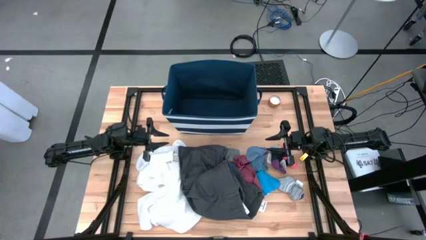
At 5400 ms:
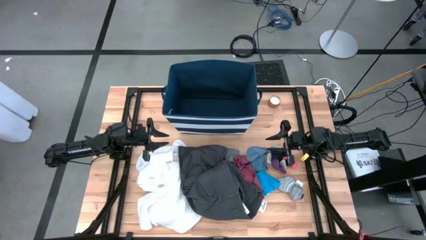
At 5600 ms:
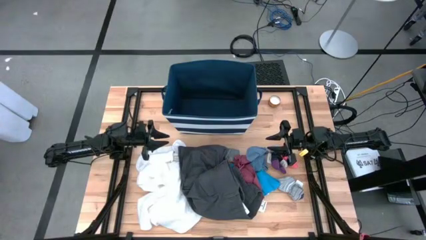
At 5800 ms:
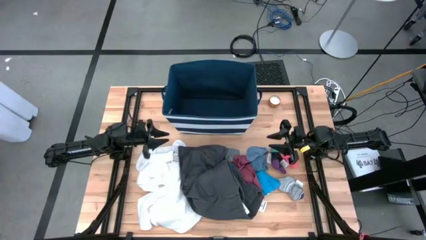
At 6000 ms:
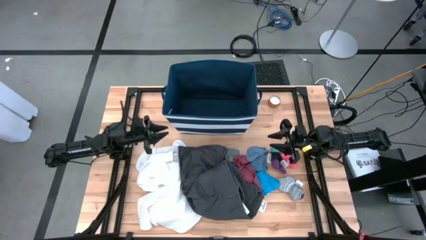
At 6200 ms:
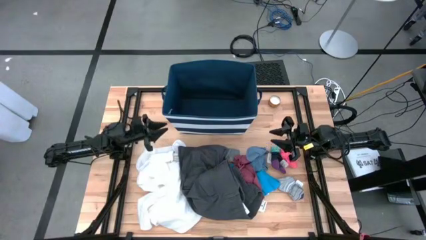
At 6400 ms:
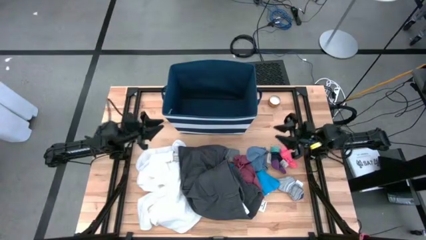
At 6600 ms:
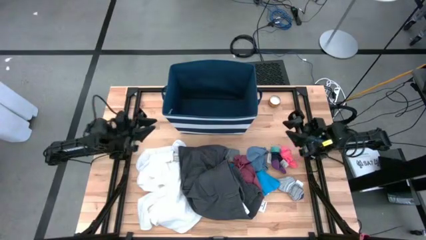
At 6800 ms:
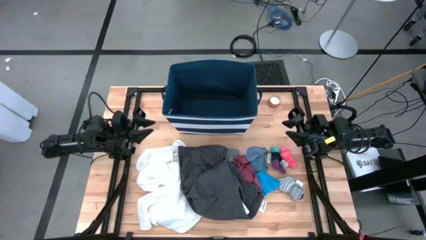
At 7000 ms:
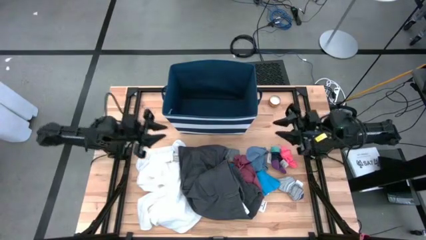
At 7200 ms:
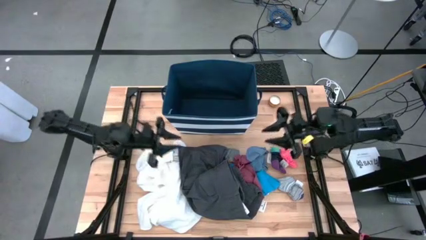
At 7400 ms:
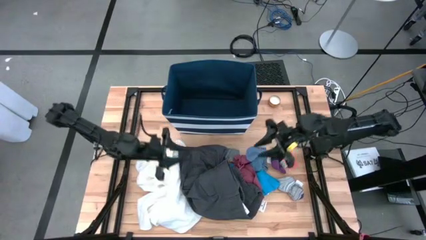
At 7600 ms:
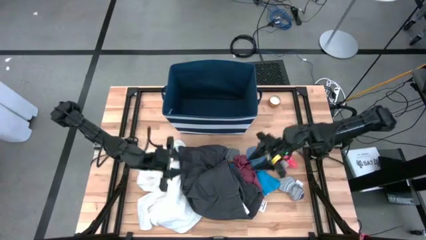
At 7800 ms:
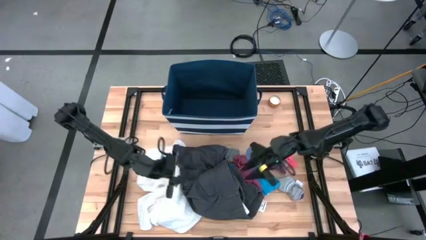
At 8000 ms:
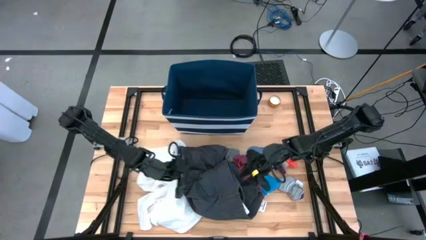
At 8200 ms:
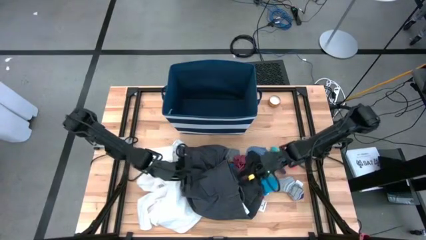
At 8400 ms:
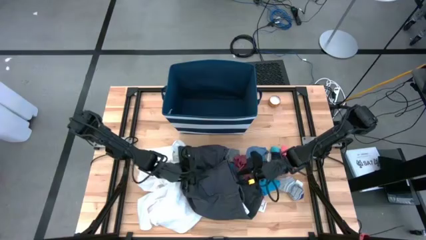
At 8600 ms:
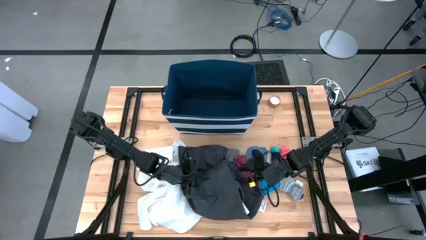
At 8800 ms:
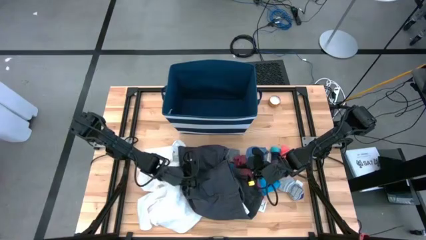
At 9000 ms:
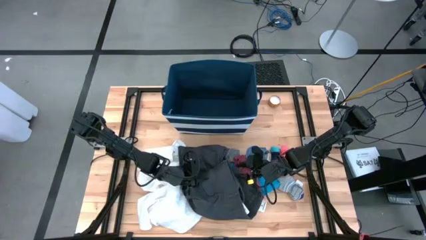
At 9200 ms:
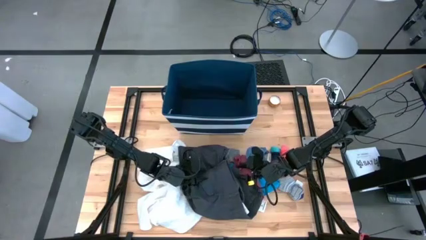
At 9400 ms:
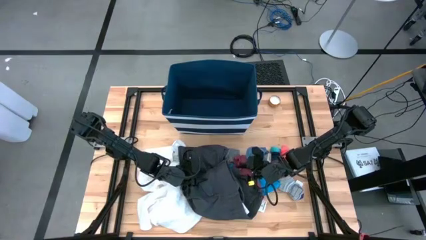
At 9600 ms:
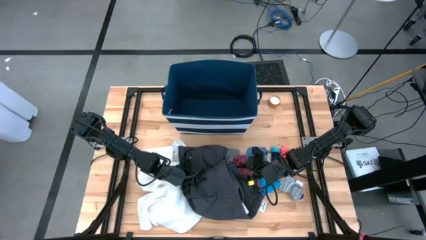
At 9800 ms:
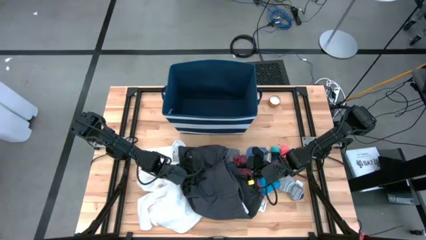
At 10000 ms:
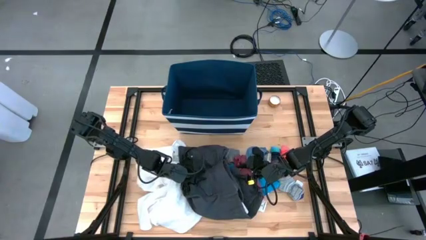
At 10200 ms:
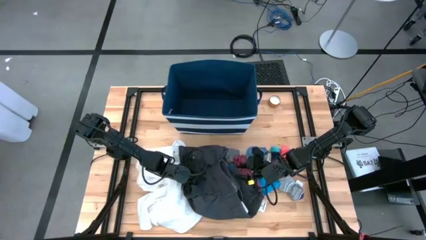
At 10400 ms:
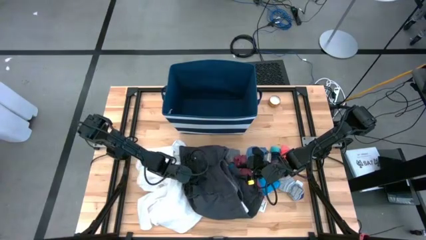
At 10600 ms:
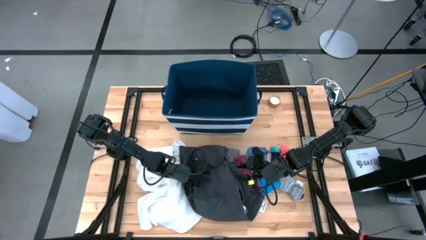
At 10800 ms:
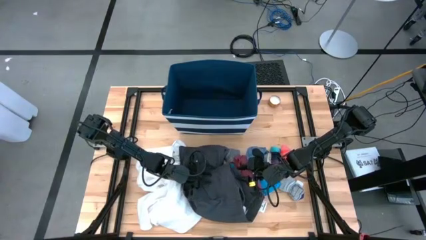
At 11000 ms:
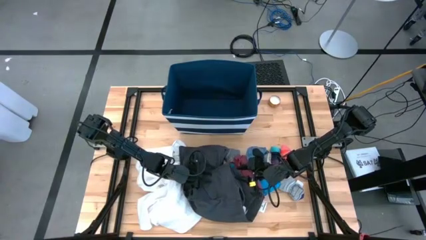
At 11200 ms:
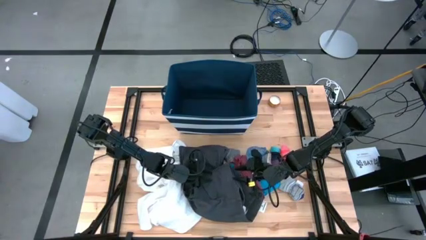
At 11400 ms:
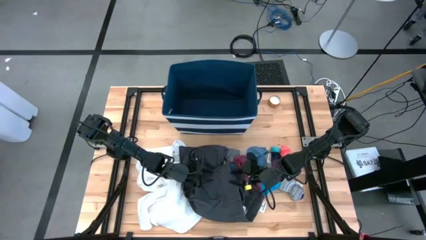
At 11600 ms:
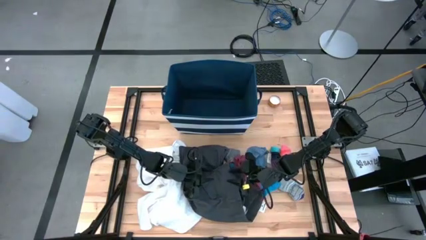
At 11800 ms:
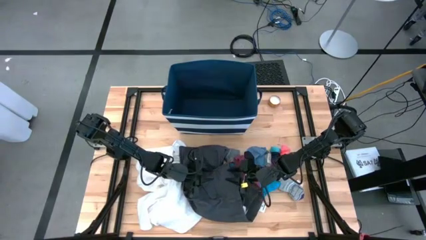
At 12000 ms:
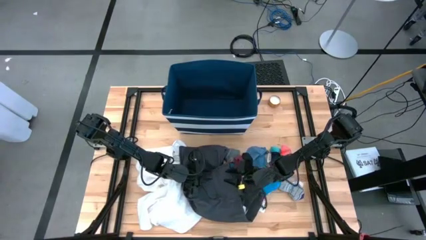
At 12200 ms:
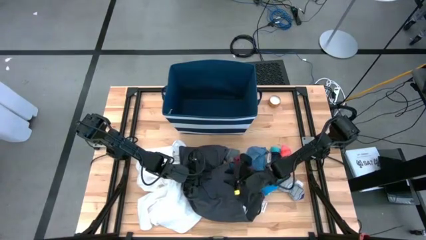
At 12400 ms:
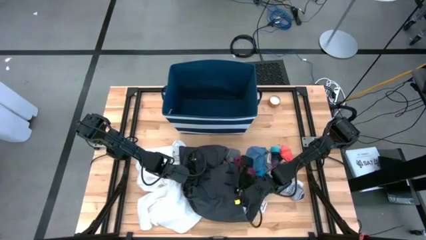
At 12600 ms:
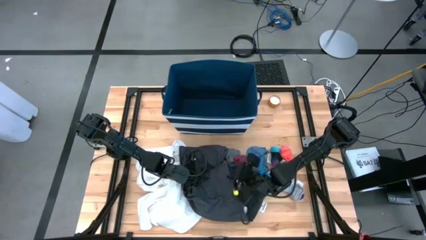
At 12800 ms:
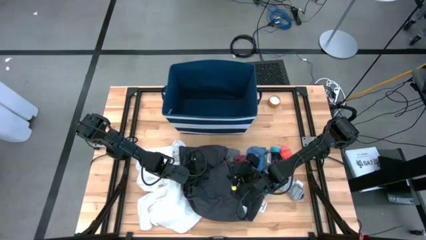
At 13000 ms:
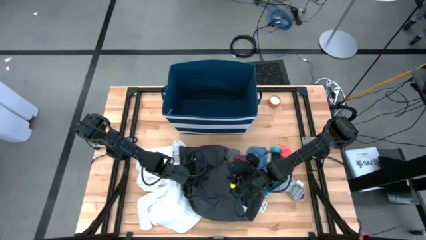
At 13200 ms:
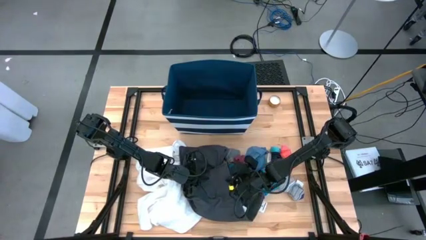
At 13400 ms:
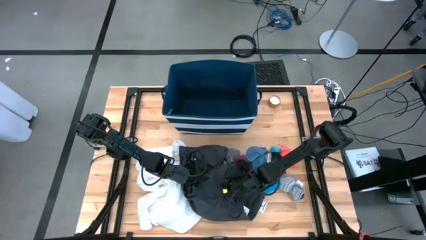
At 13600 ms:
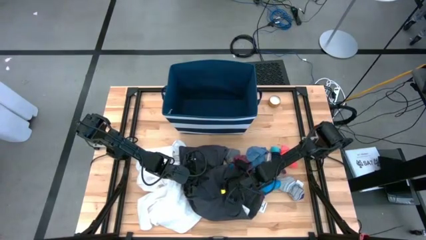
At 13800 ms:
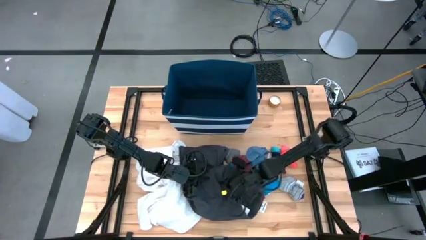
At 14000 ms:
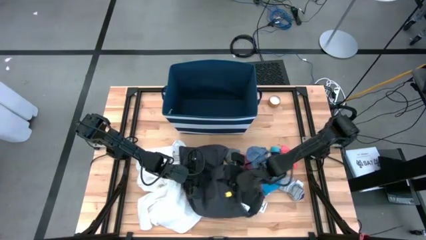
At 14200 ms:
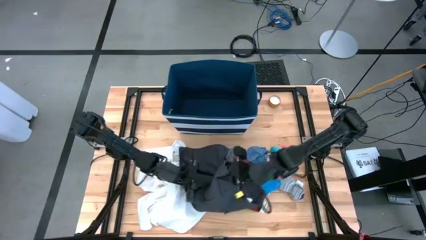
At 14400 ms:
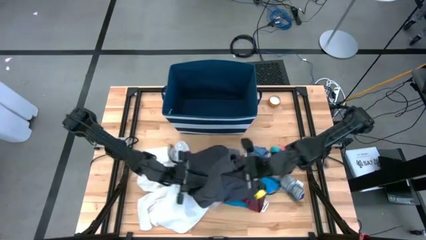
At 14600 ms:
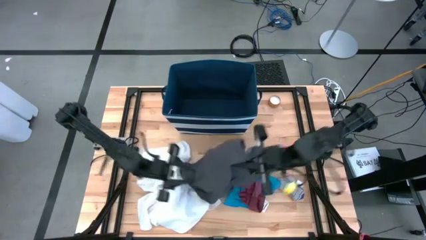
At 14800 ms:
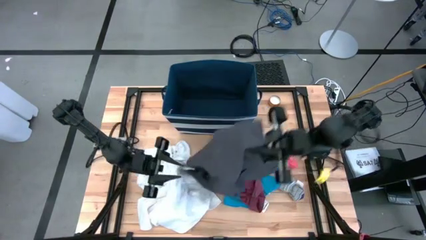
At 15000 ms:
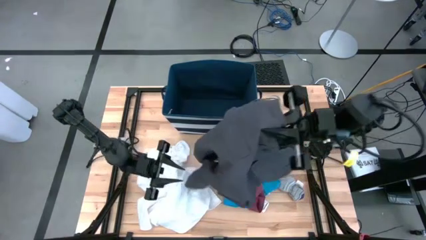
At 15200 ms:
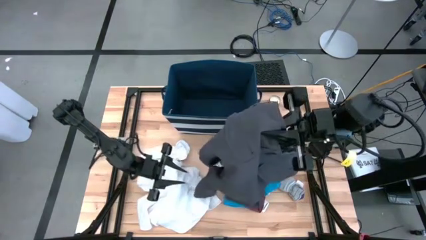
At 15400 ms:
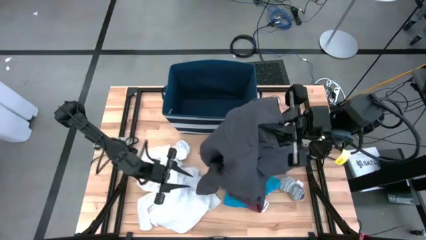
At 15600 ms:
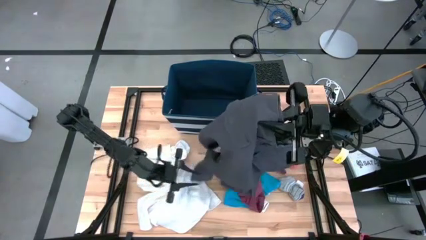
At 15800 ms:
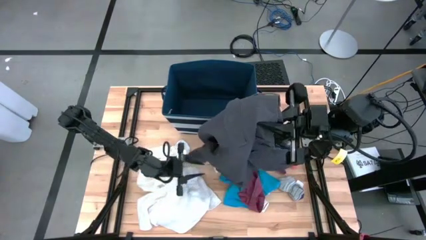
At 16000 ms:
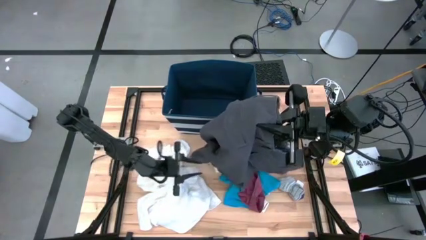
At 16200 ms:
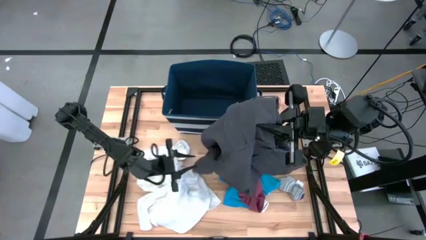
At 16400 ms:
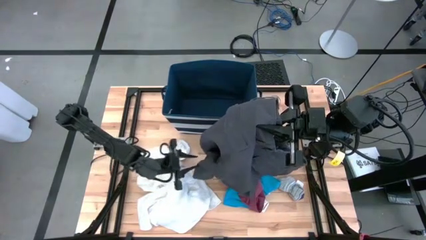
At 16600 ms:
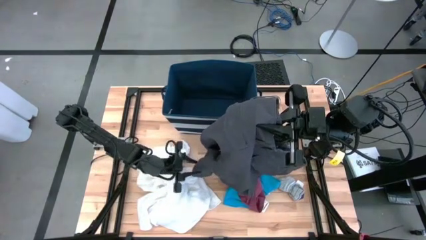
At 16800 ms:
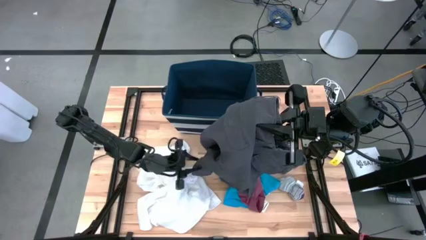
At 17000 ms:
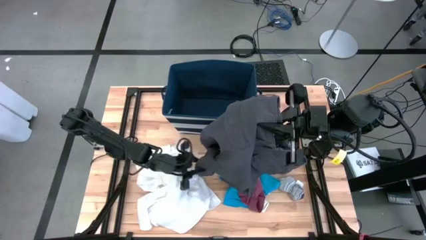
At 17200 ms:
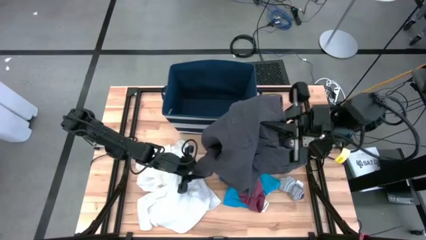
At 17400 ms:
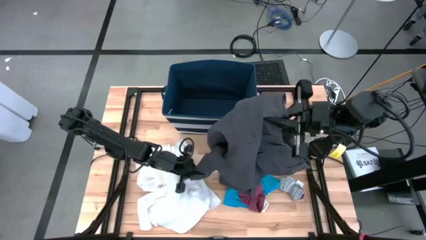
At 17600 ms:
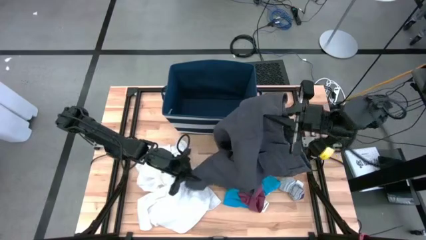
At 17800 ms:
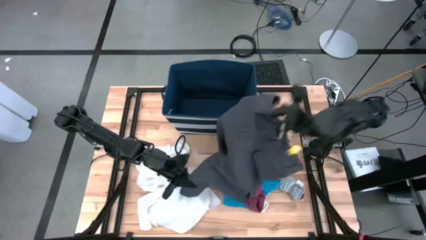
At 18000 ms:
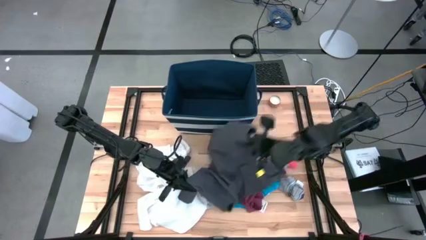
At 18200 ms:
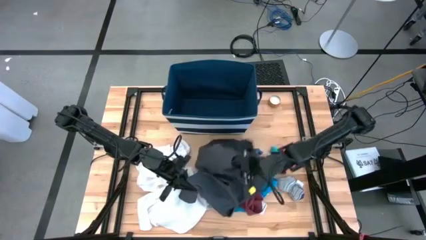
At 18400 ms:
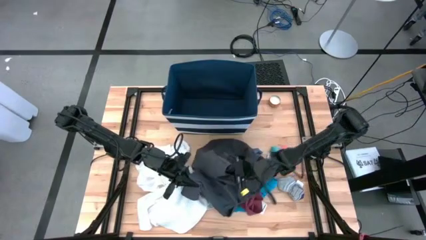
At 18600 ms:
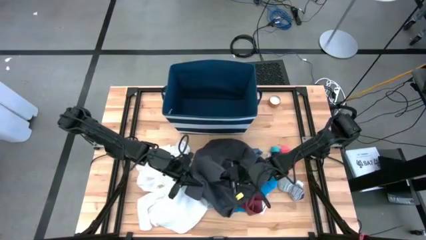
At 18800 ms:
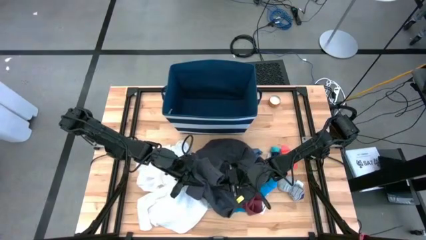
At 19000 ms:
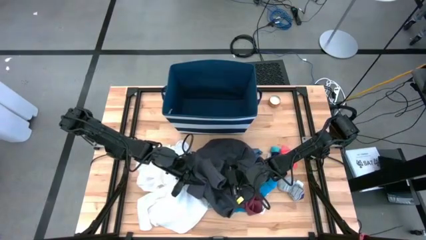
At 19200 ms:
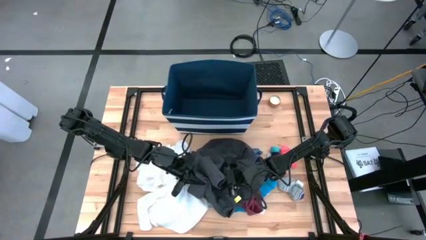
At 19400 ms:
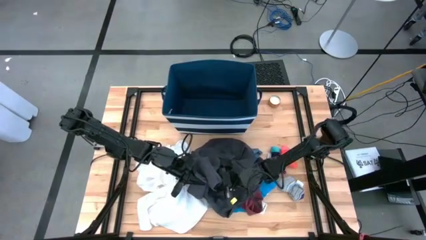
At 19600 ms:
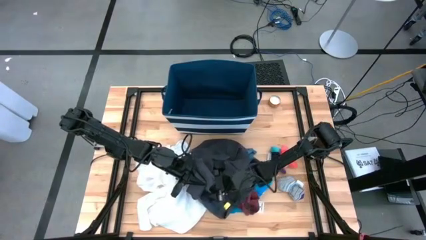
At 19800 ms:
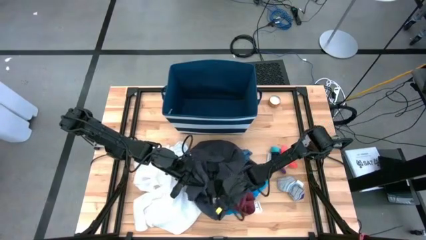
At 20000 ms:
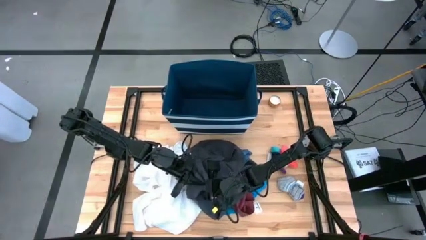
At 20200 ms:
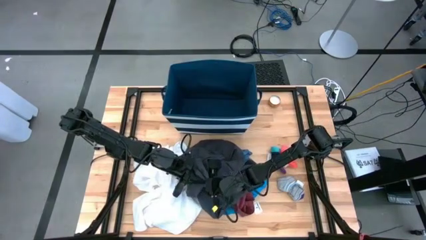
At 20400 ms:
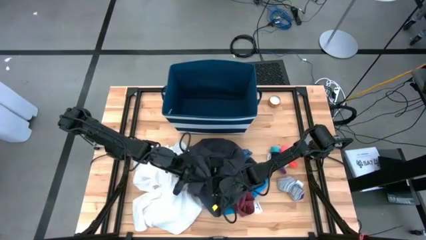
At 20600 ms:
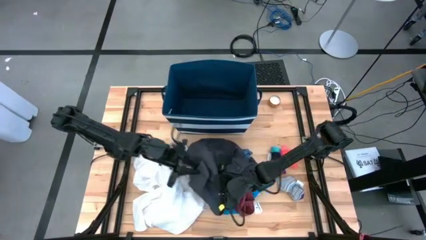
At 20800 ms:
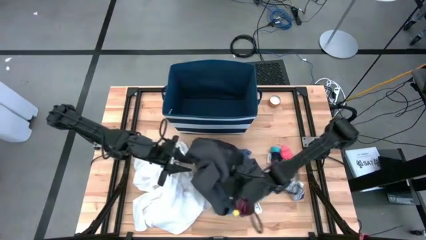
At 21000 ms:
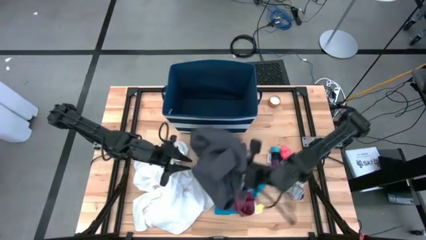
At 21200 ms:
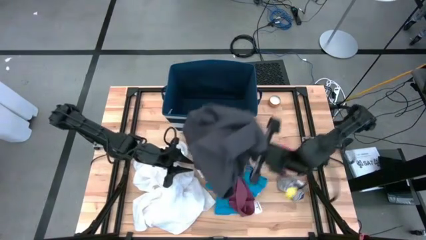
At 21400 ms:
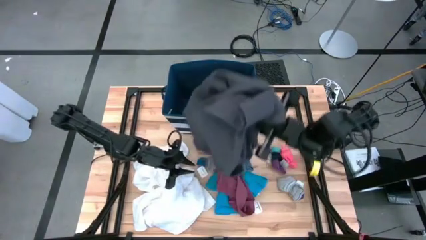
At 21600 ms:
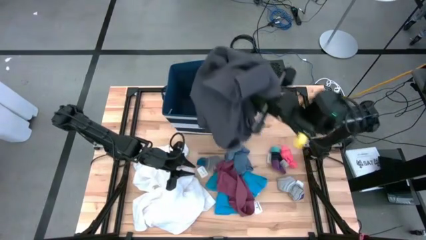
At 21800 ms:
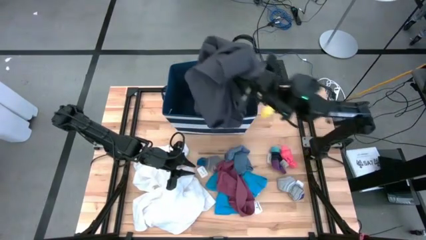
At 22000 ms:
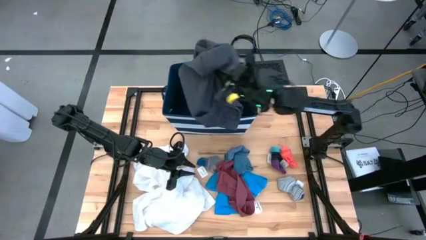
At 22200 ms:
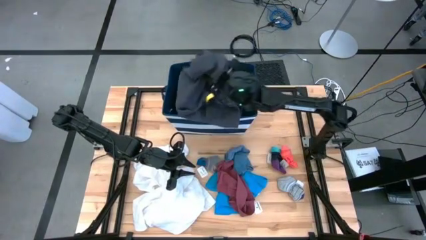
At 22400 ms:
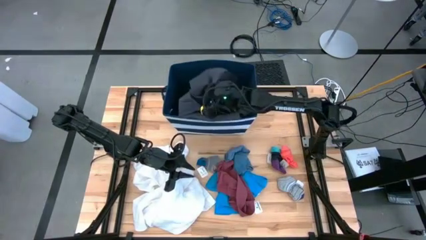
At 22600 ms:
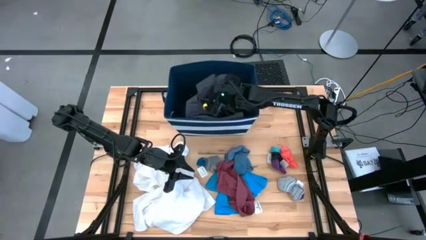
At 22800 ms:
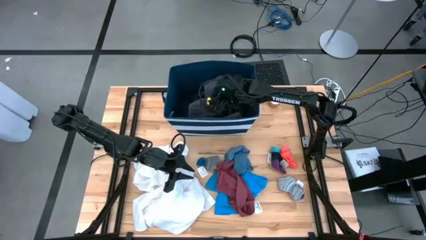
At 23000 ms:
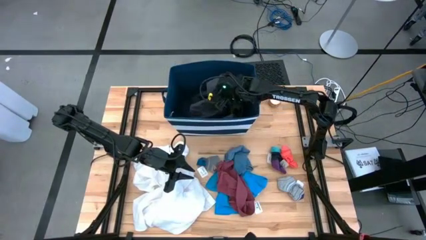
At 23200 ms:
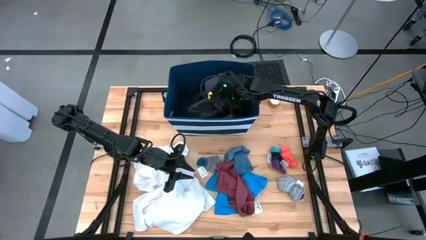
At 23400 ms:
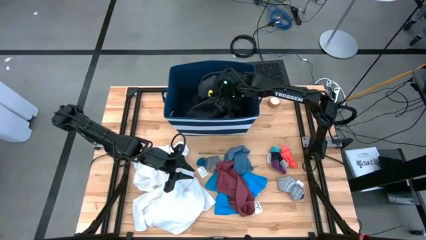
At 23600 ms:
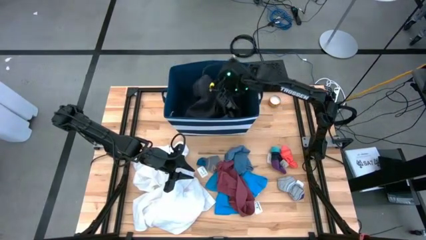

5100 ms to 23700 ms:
Task: Sort clothes
Put the black shorts into the blue bin
